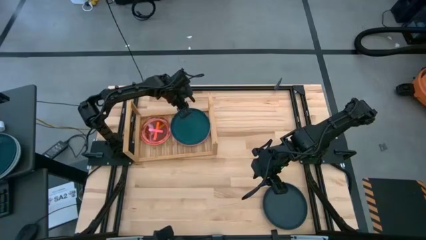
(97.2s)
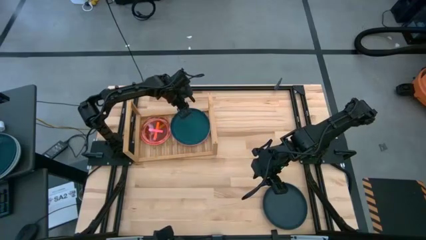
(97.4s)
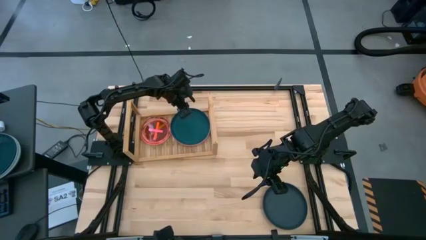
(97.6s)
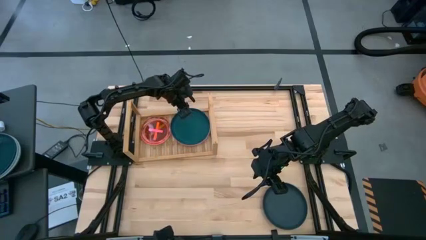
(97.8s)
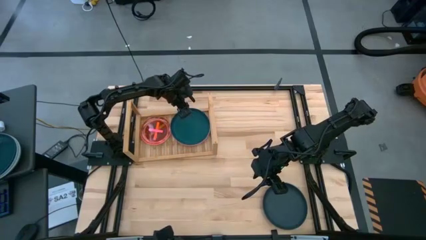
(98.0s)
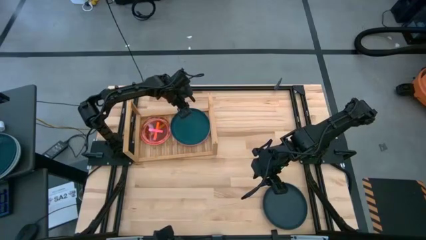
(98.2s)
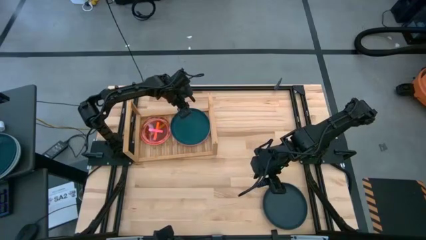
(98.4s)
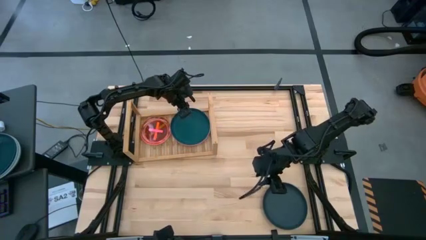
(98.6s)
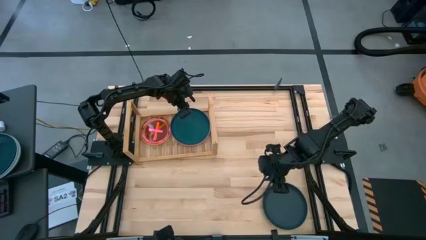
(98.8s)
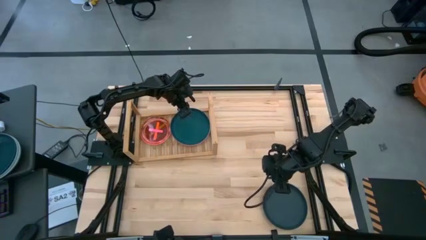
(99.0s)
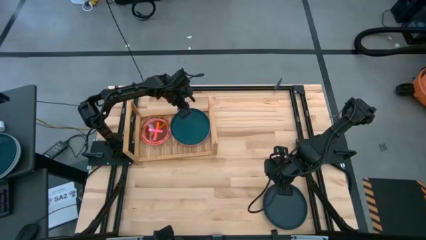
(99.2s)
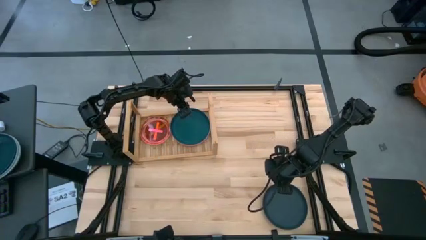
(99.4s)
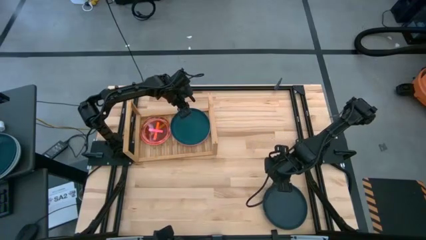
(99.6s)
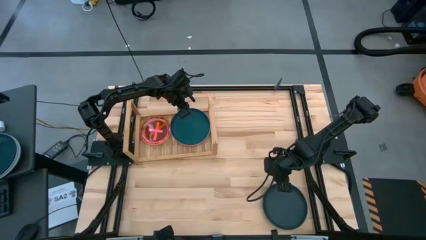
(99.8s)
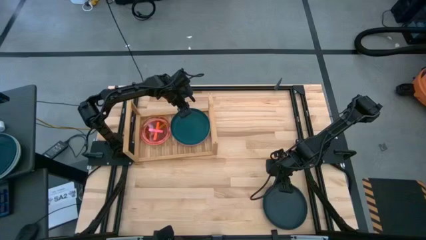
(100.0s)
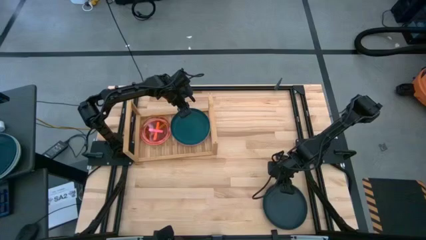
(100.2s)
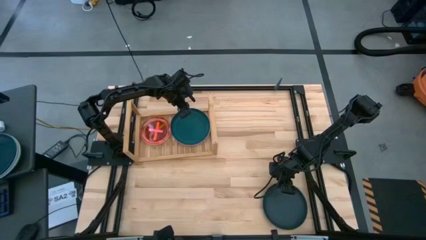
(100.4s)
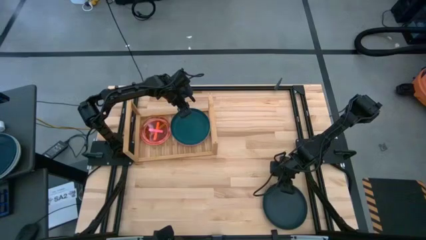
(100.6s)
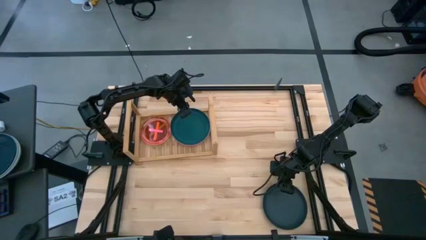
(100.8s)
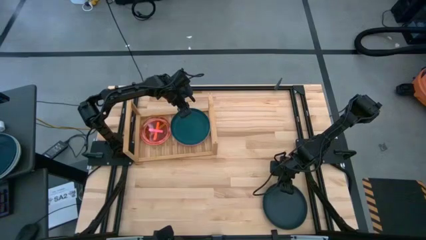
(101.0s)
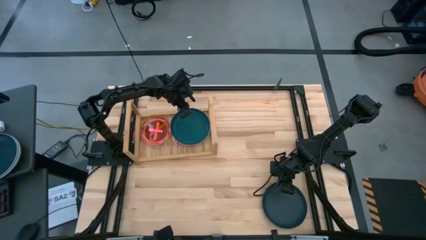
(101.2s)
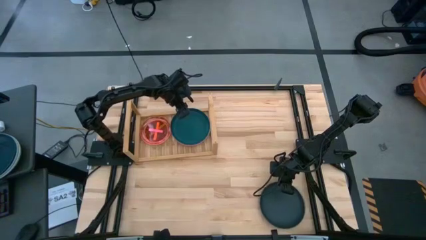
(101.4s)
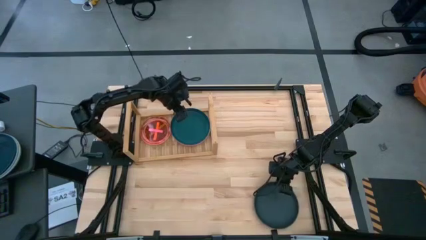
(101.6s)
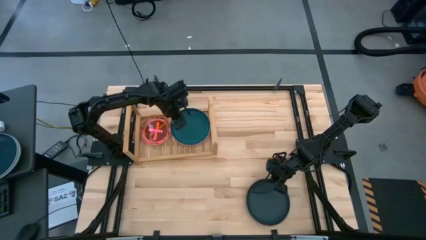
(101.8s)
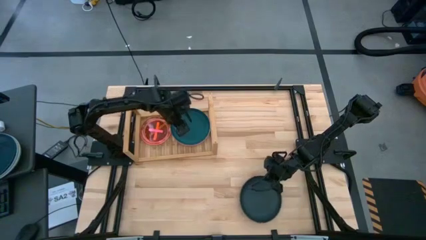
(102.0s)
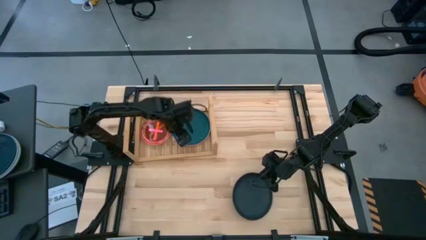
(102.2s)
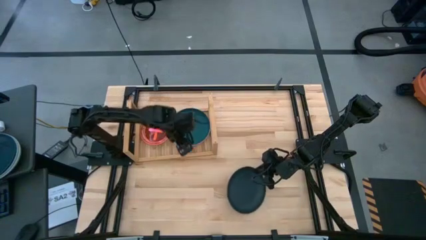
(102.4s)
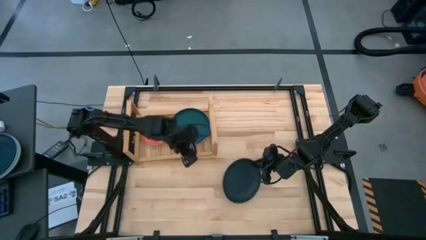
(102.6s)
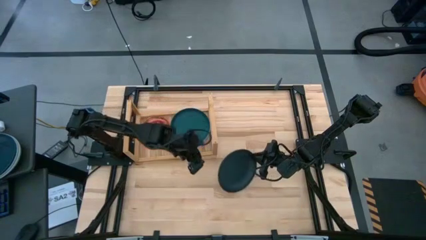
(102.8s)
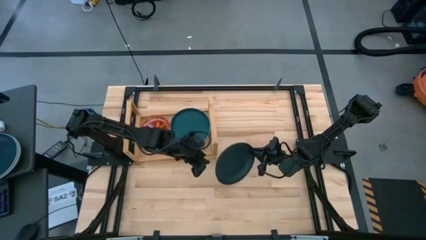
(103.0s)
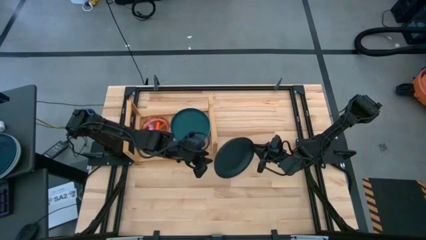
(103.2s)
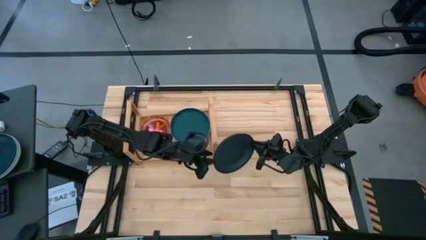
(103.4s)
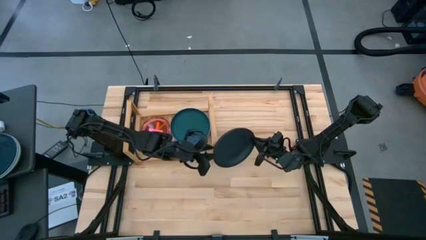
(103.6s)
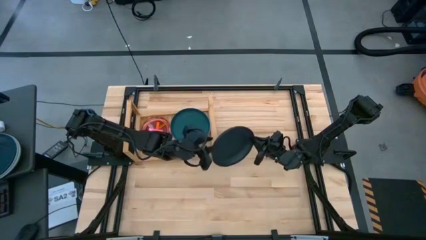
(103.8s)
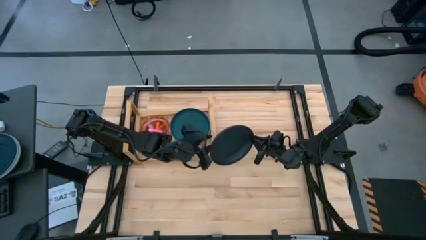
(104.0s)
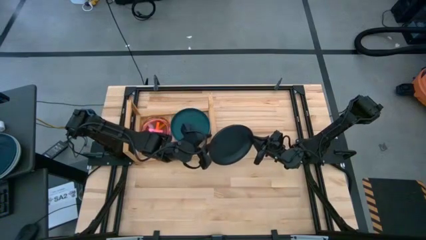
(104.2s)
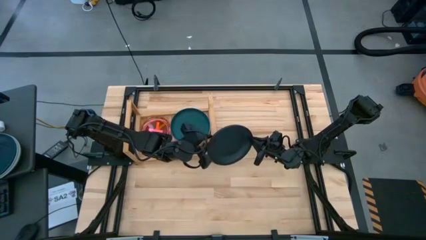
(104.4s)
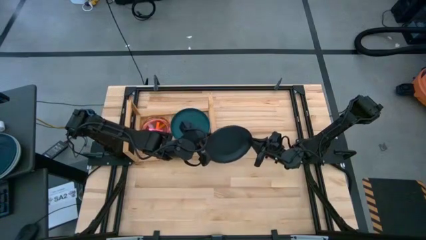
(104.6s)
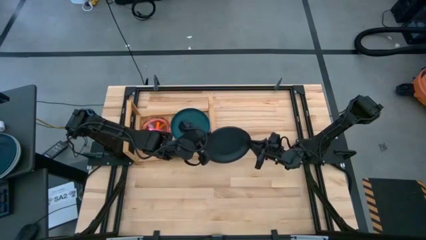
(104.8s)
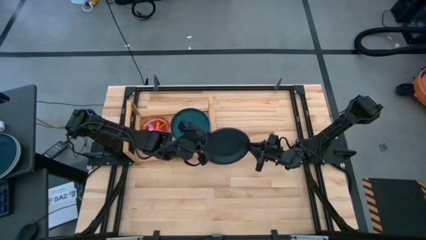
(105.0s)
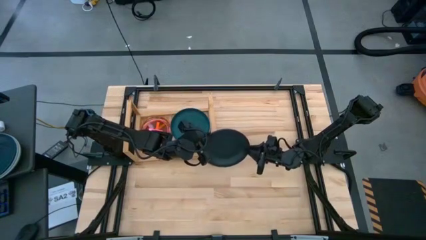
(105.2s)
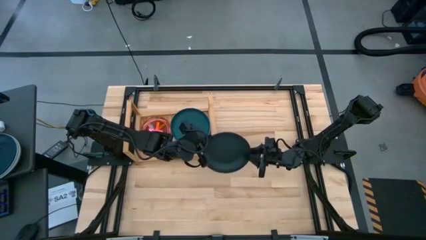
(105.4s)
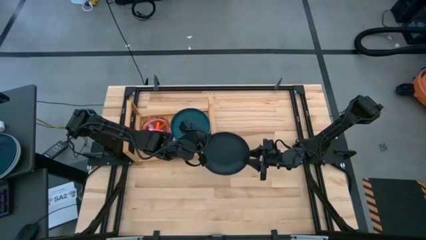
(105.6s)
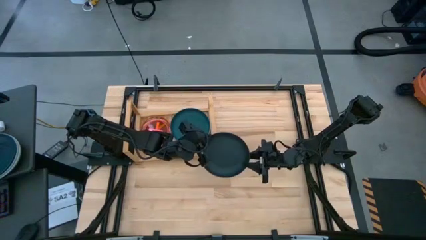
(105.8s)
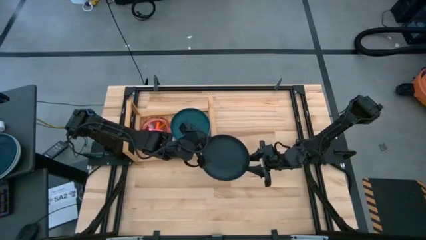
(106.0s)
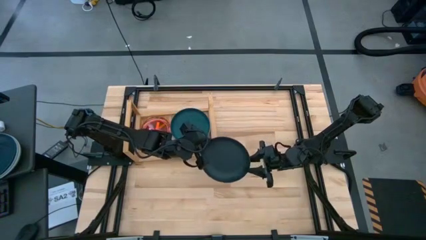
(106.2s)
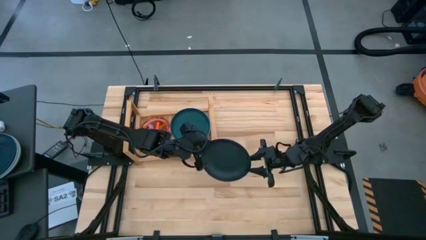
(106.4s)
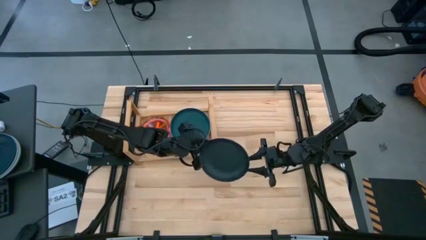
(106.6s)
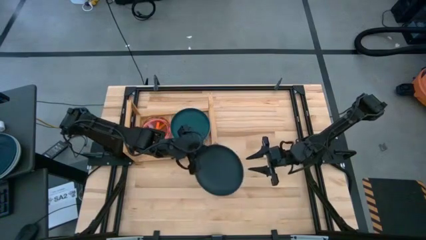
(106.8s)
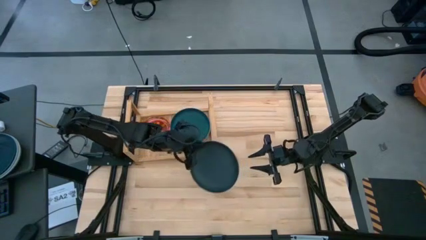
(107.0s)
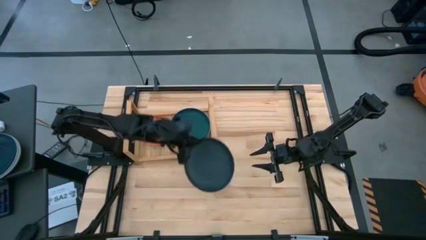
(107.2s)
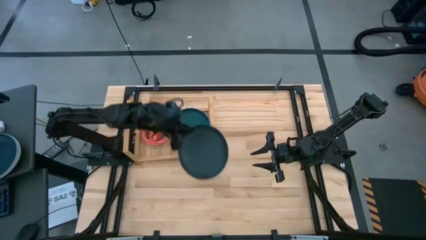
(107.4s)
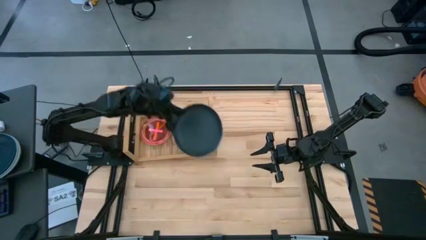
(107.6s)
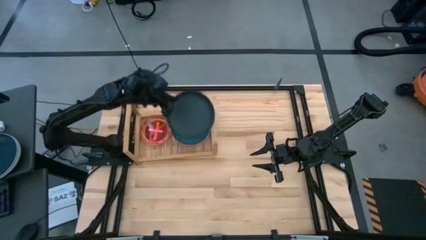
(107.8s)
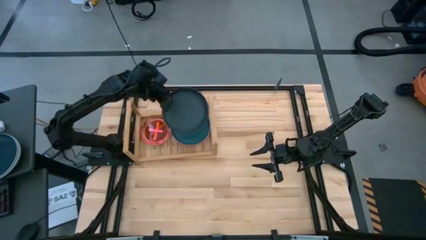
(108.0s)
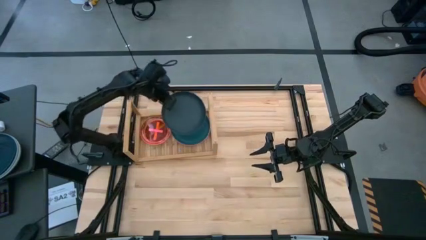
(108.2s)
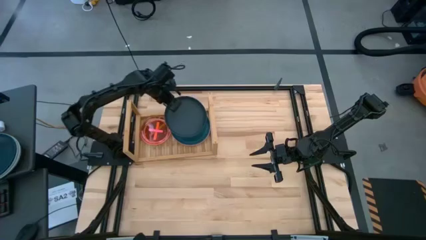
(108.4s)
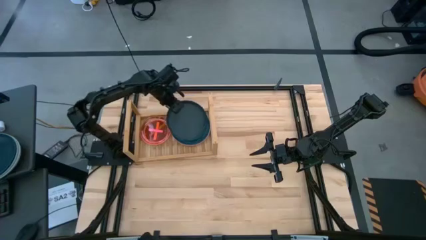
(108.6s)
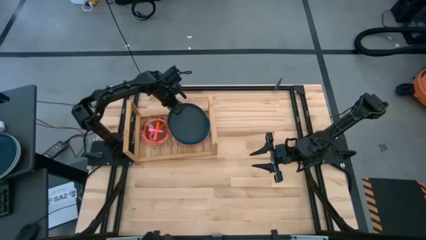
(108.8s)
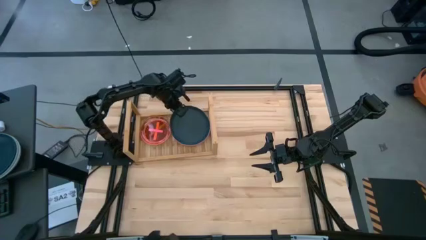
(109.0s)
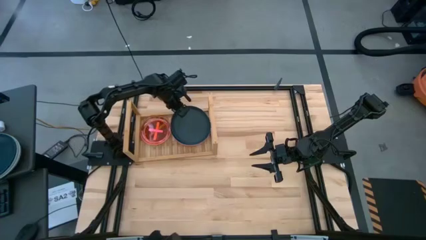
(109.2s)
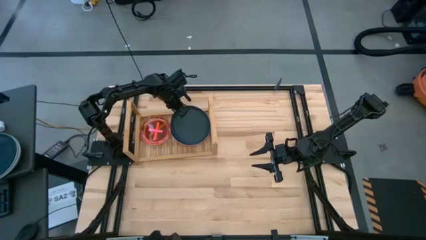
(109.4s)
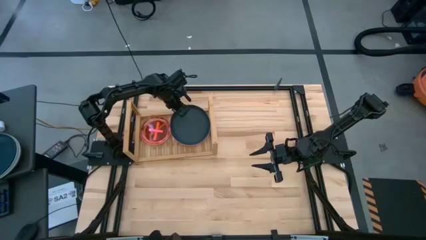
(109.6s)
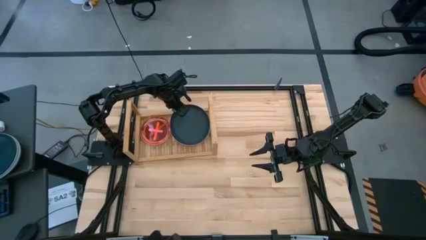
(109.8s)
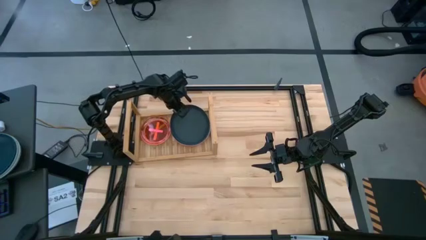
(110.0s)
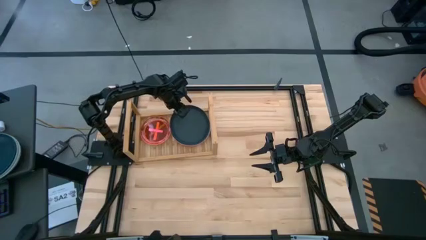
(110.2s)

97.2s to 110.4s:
Task: Place and stack plates onto a shelf
Stack the black plate on top of the green plate on the shelf
